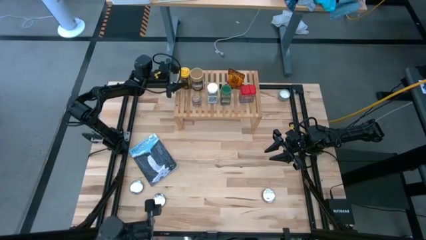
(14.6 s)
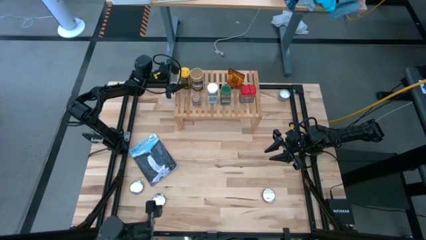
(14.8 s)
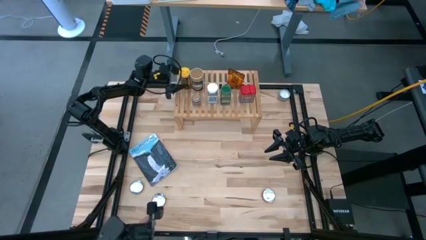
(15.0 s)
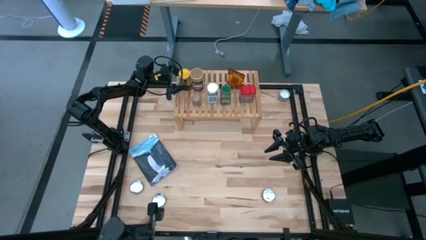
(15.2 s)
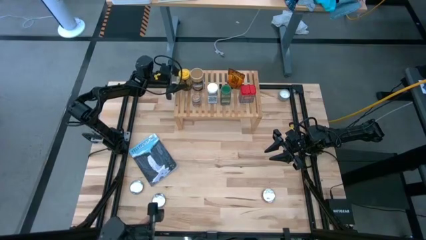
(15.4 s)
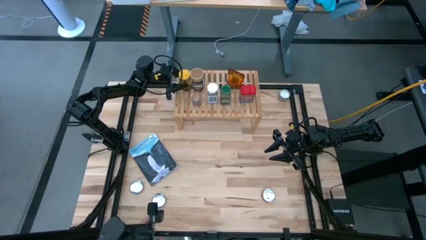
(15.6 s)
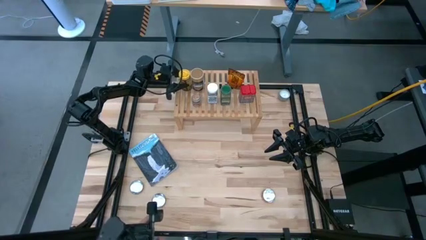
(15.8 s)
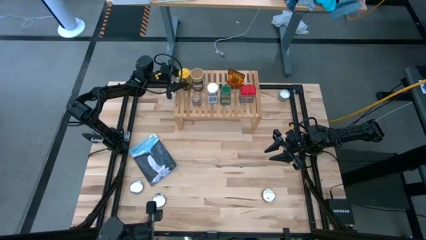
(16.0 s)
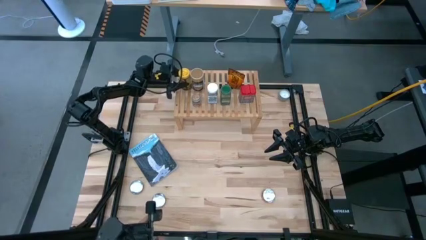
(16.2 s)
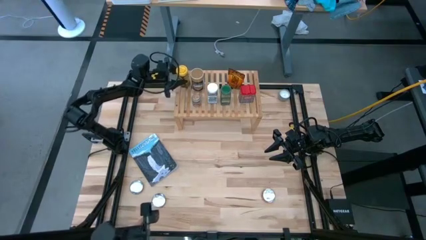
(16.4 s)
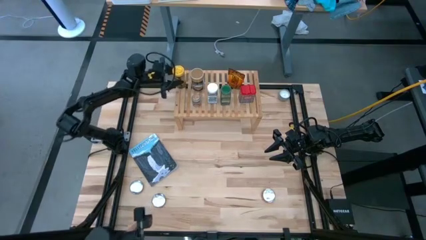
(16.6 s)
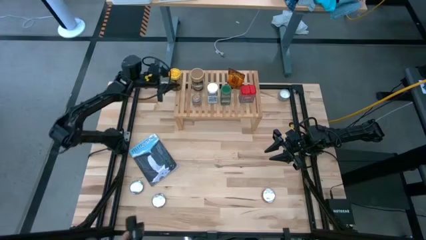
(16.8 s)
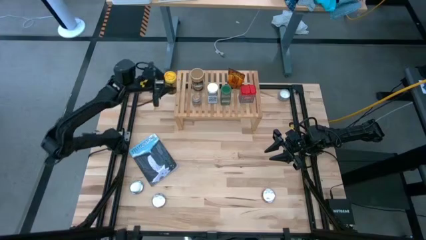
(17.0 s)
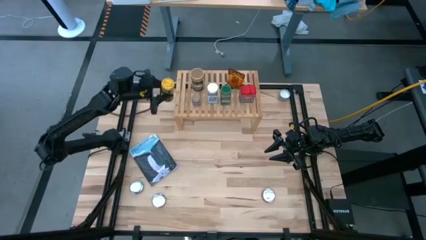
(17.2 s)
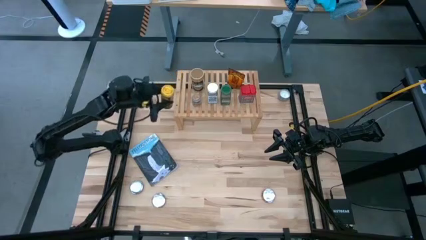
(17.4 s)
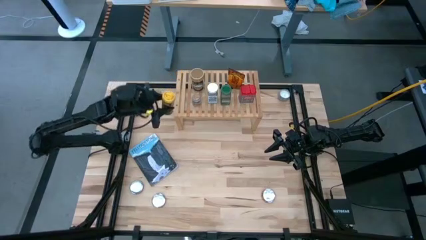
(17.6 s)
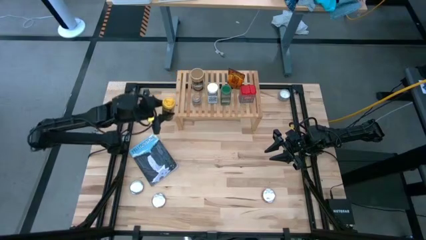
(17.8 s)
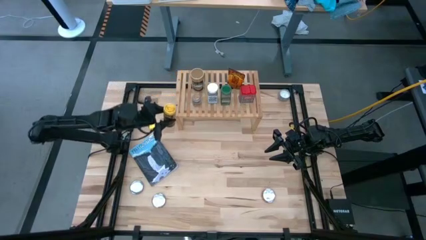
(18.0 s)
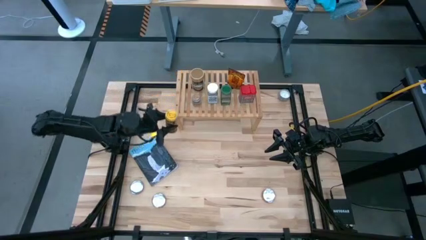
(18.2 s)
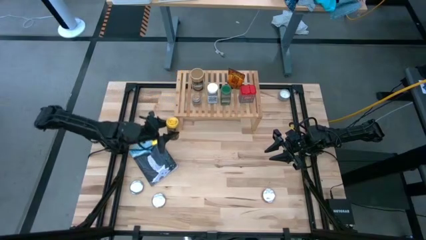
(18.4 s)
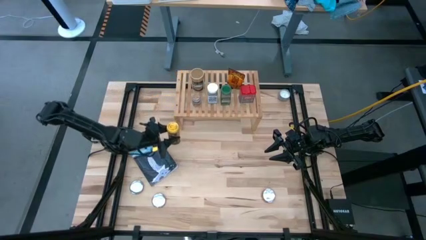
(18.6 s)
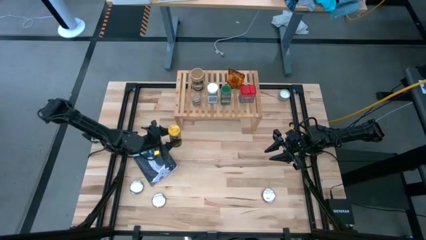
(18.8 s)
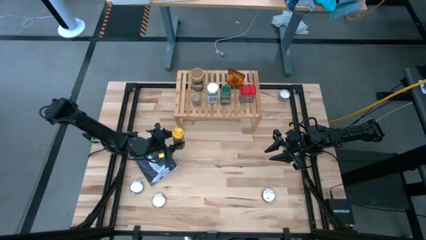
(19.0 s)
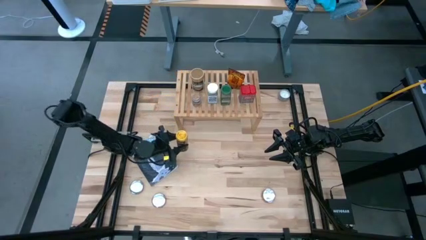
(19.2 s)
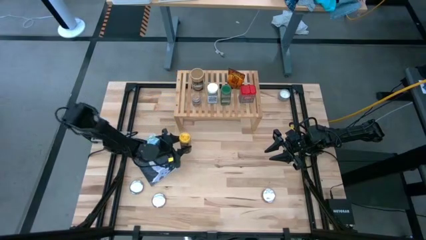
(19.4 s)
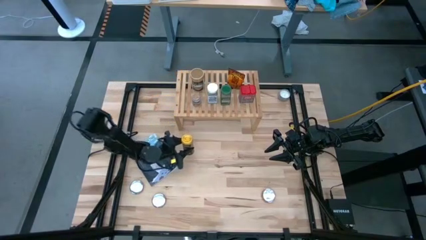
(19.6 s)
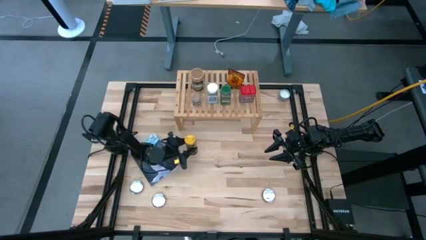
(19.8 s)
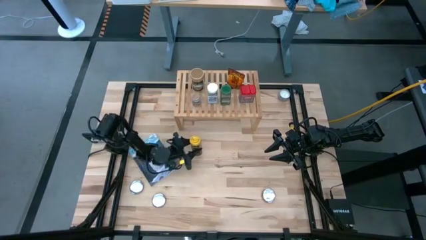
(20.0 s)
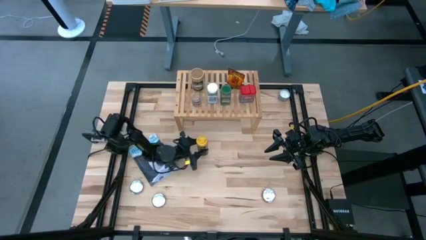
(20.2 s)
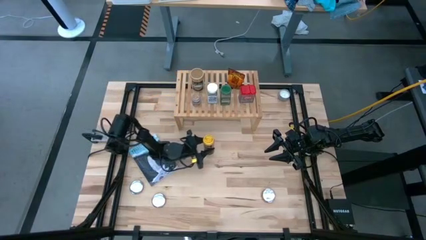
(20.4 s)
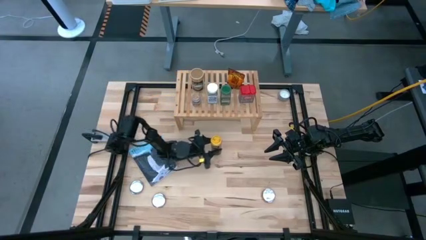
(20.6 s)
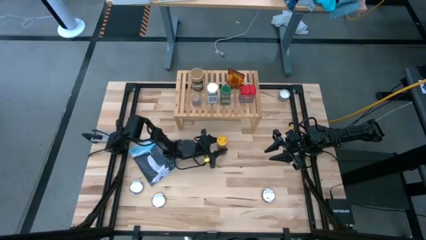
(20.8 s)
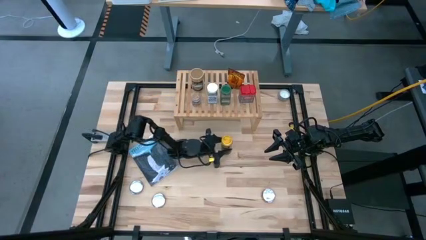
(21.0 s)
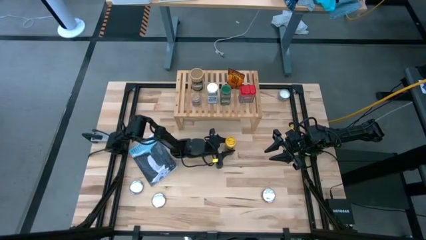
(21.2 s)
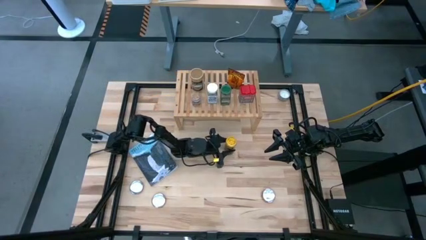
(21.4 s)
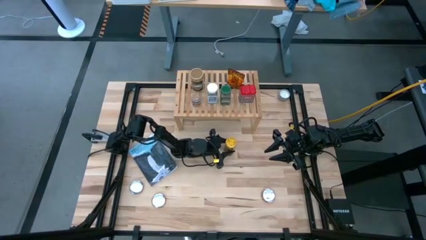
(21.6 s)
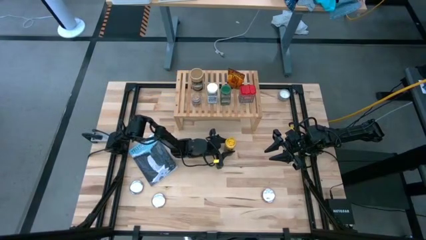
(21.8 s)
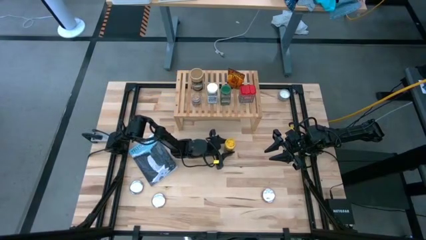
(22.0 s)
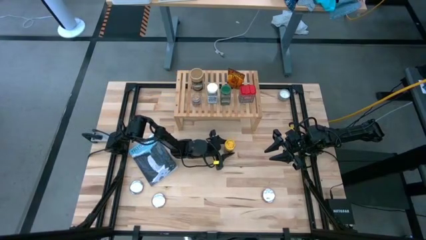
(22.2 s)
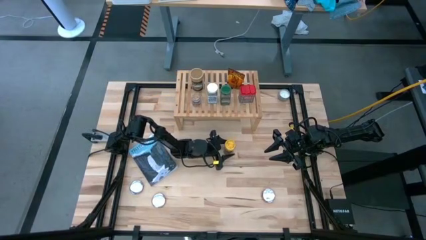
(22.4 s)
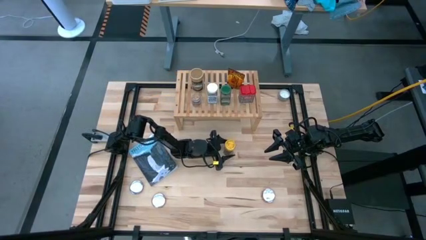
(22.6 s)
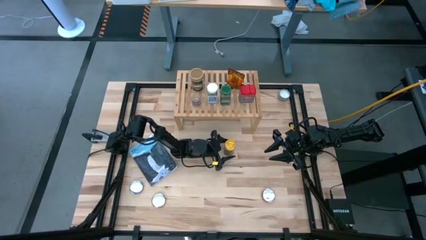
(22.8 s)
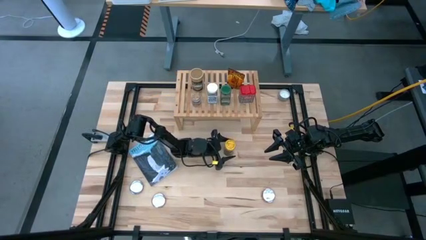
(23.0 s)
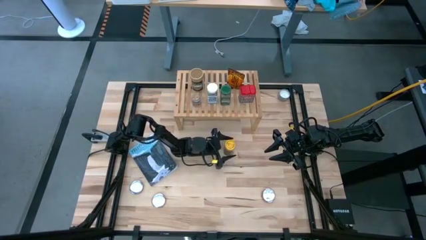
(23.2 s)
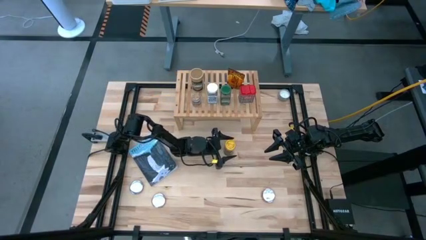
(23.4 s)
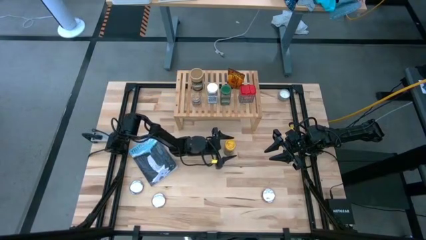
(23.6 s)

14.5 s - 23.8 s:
Task: Shelf spices
Remove the yellow seasoning bottle from the shelf

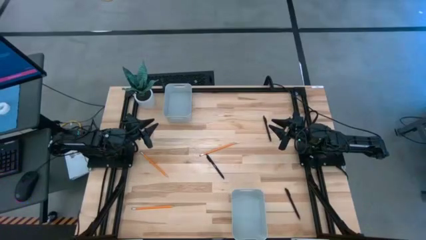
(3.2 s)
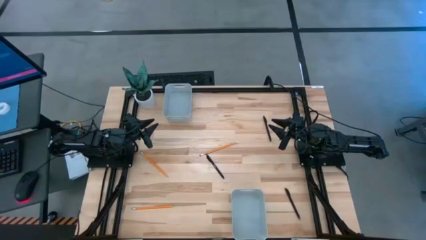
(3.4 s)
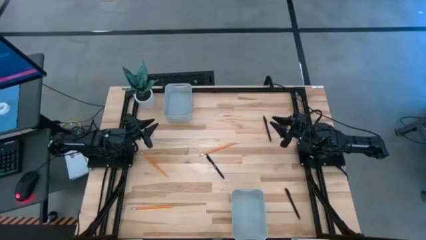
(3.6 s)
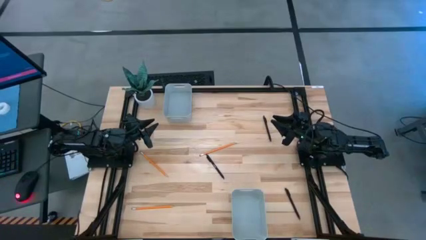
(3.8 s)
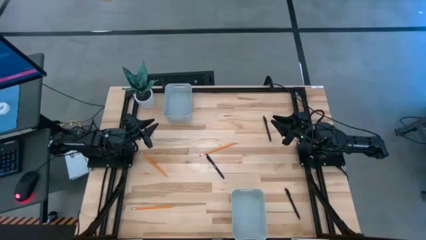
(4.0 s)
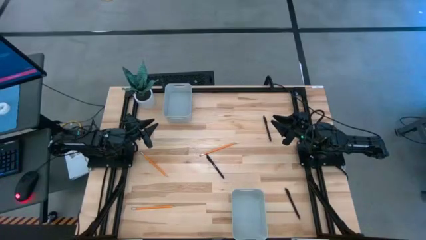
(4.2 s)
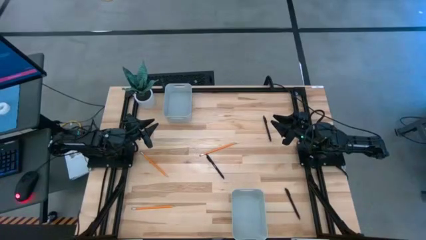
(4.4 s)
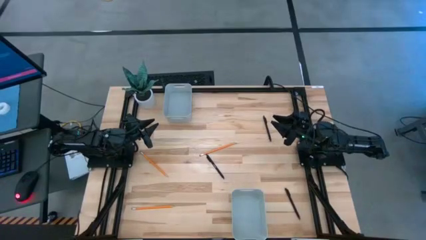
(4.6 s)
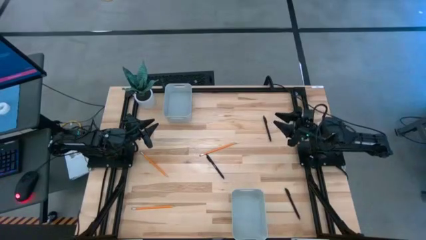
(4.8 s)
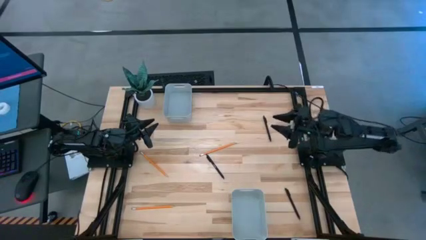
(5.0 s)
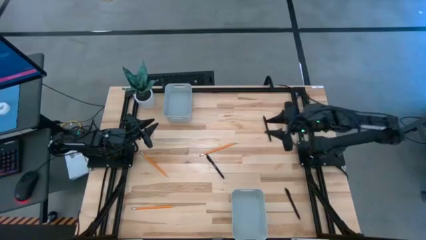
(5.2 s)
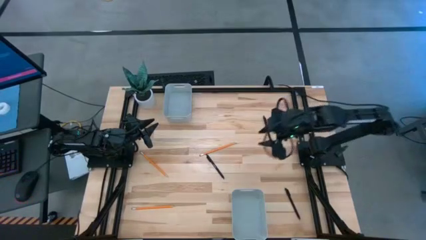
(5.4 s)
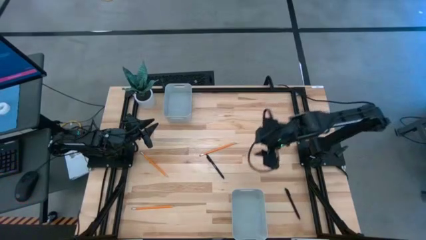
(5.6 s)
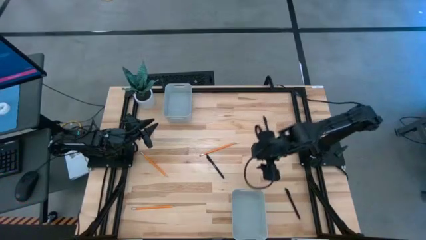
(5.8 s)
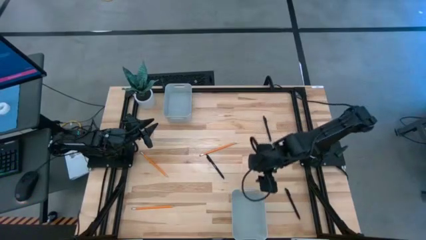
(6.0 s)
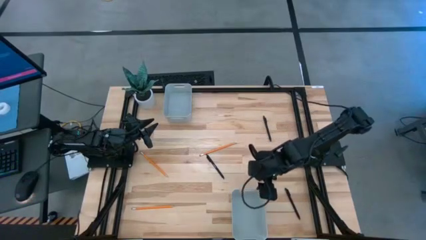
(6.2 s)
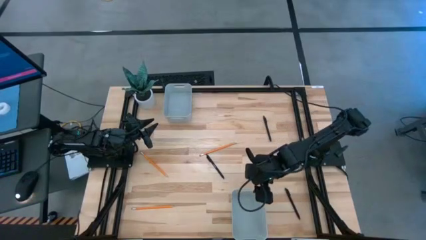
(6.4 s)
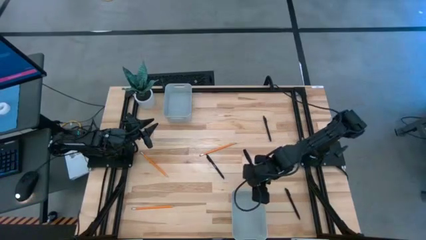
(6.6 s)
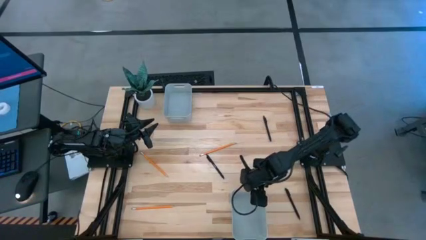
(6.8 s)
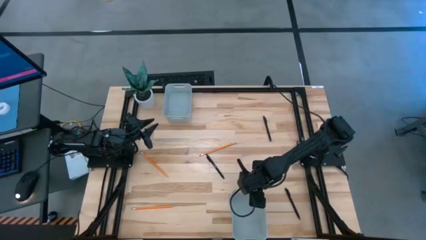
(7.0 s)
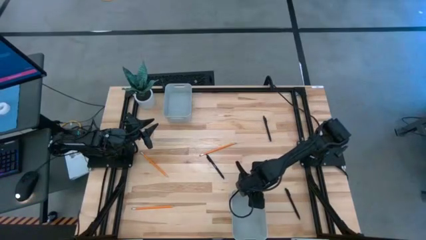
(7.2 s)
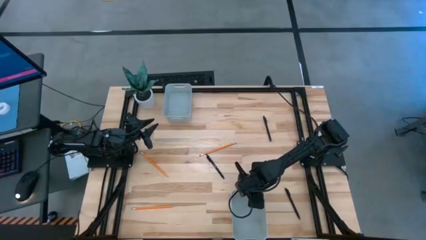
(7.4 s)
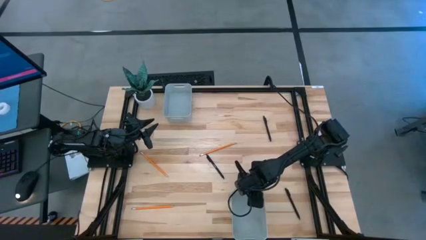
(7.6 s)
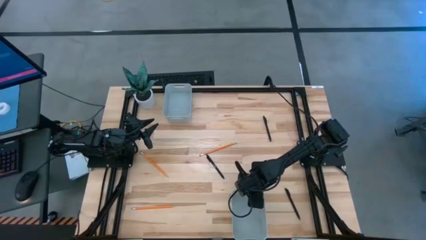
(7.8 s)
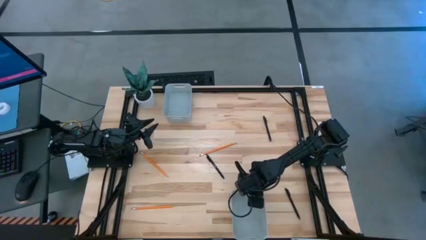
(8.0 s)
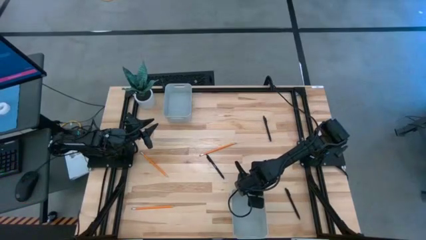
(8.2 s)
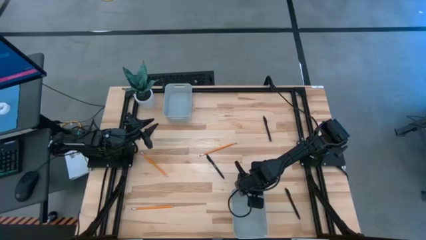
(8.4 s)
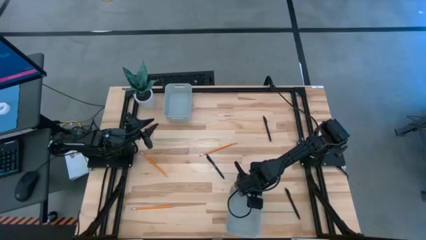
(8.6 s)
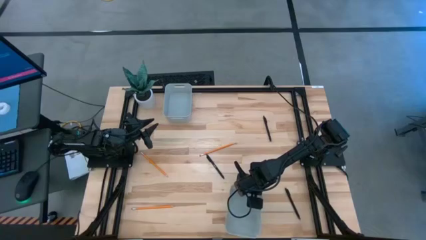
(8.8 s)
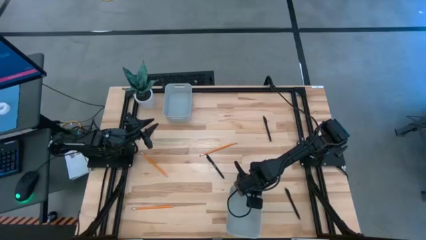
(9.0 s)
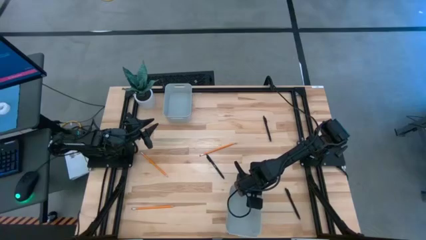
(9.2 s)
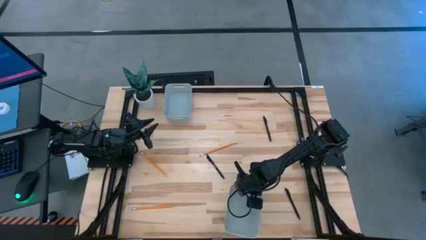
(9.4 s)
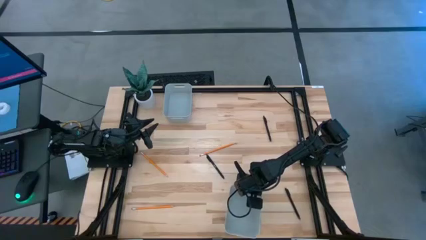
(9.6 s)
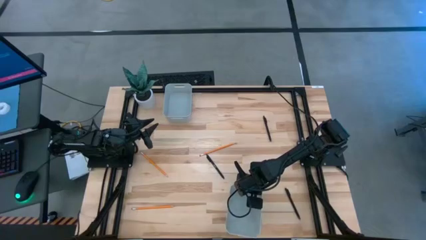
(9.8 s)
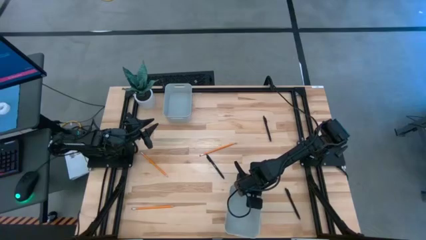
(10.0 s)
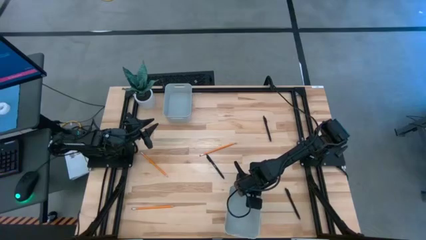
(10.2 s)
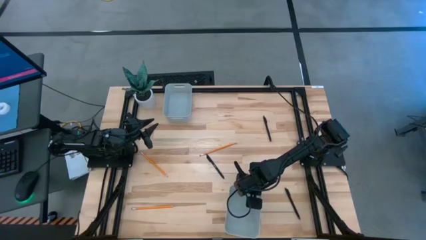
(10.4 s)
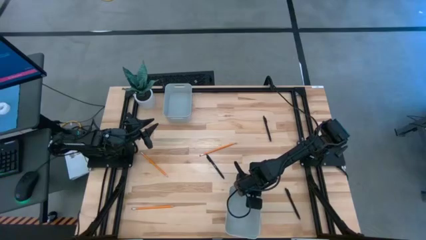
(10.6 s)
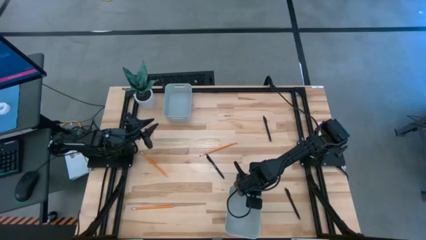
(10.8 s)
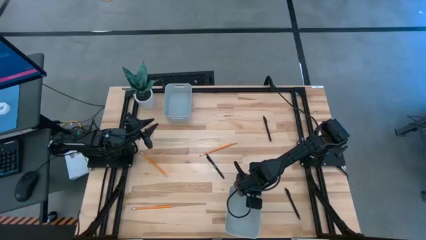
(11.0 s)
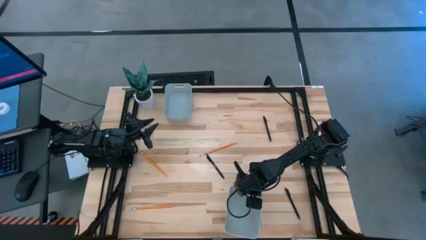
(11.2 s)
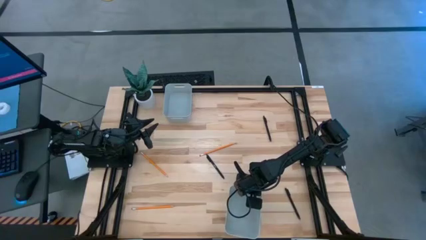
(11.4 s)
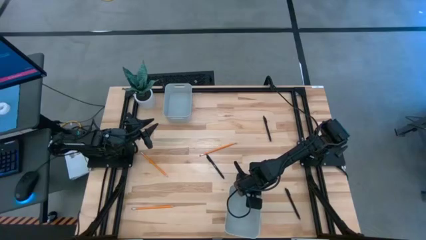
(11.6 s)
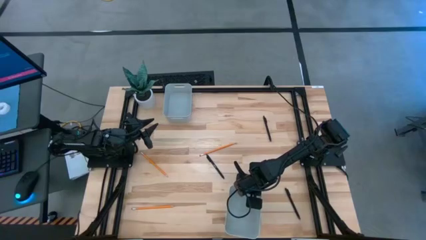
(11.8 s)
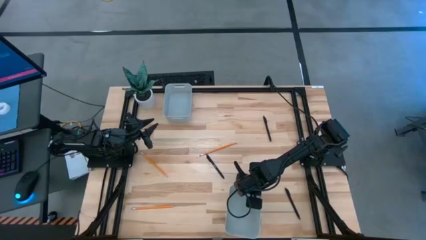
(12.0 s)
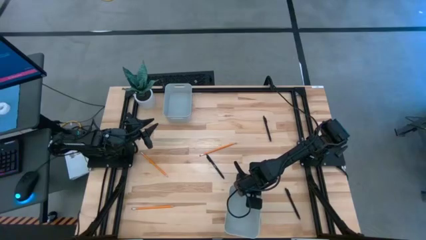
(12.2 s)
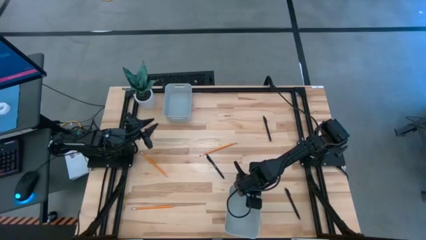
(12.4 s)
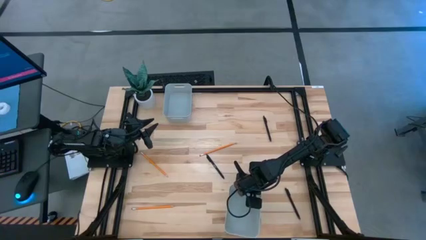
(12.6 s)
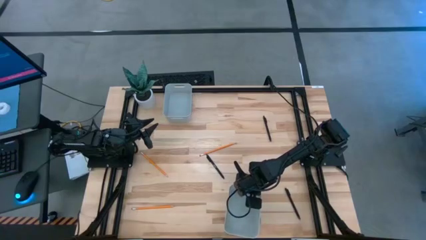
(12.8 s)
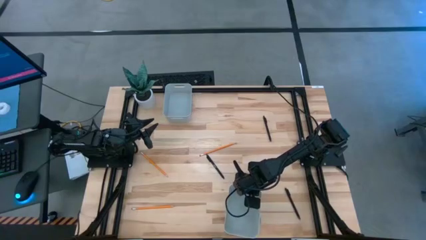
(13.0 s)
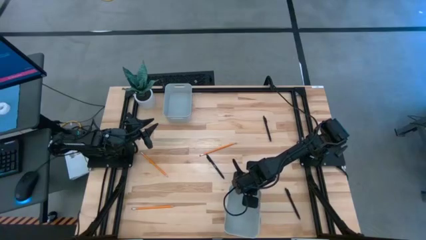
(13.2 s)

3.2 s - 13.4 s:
Task: Sort pens & pencils
Move the bottom white bin to the top of the table
